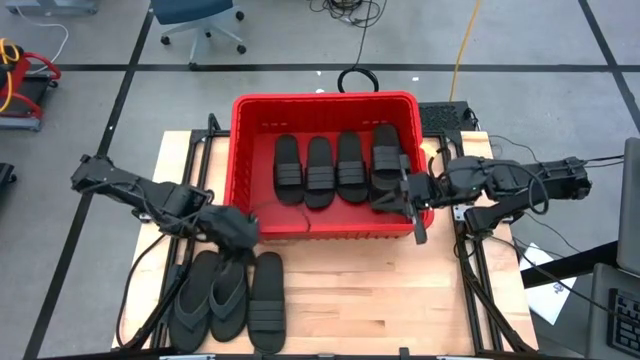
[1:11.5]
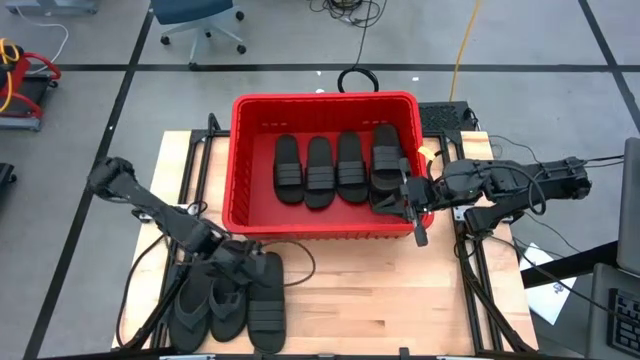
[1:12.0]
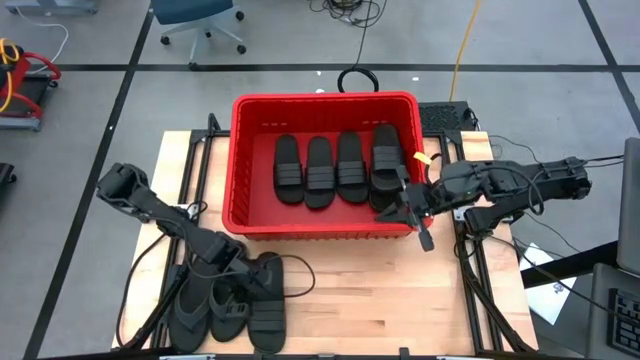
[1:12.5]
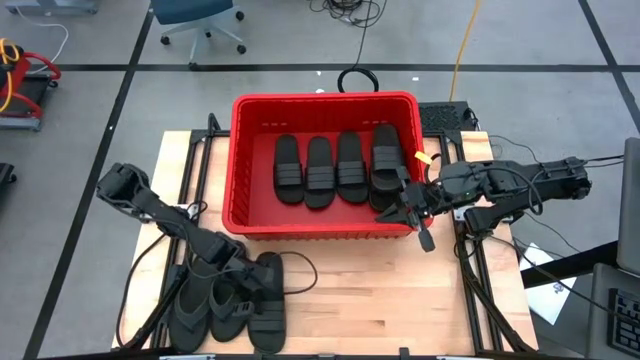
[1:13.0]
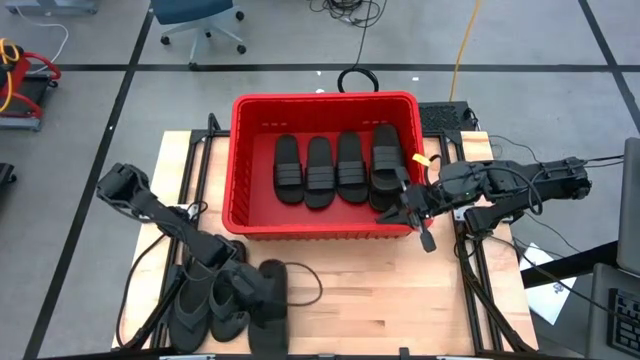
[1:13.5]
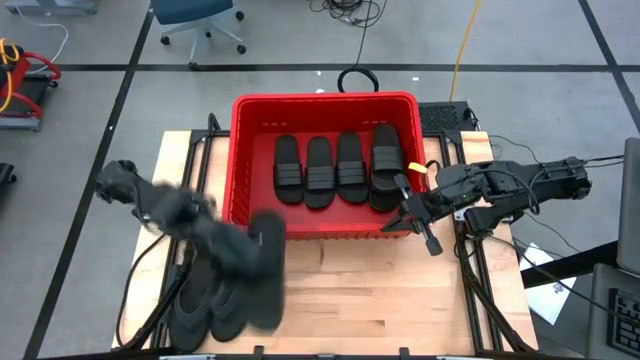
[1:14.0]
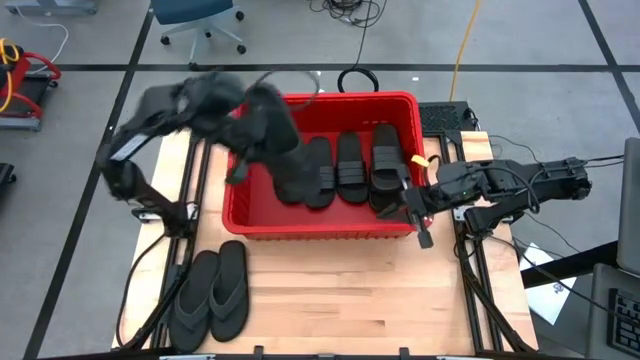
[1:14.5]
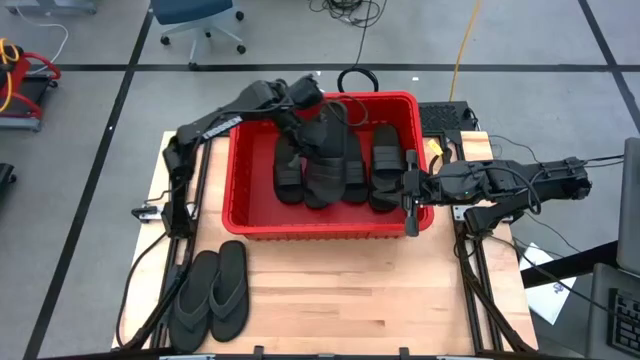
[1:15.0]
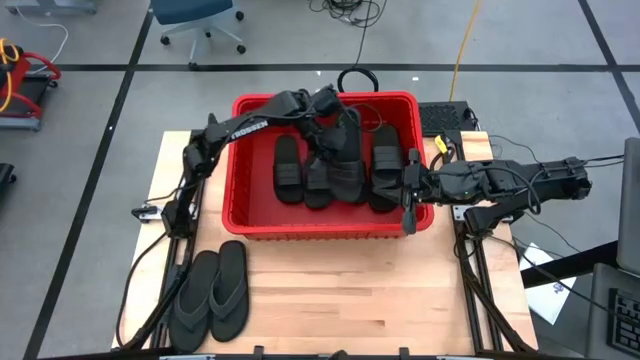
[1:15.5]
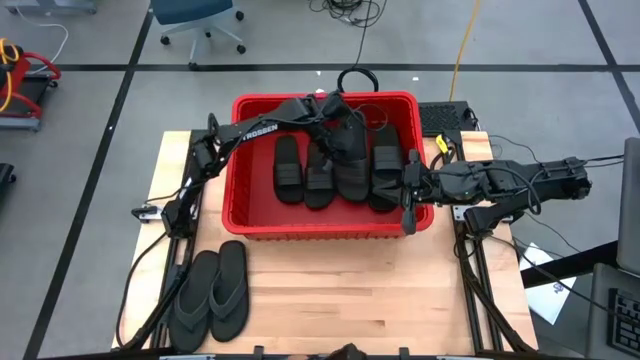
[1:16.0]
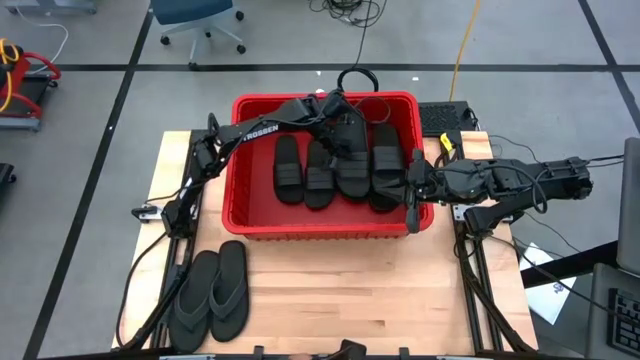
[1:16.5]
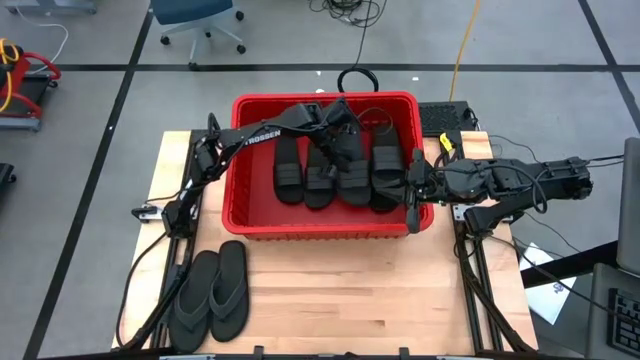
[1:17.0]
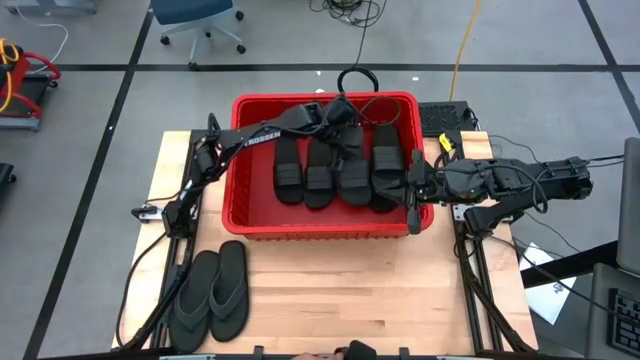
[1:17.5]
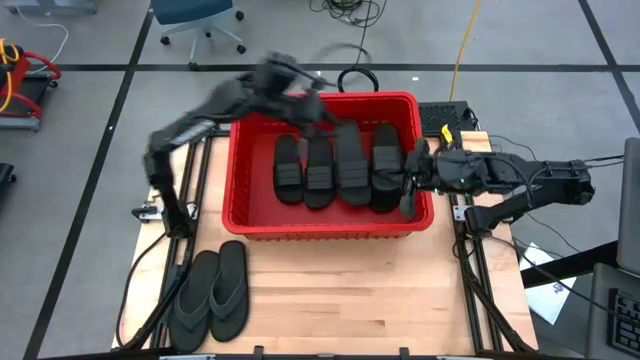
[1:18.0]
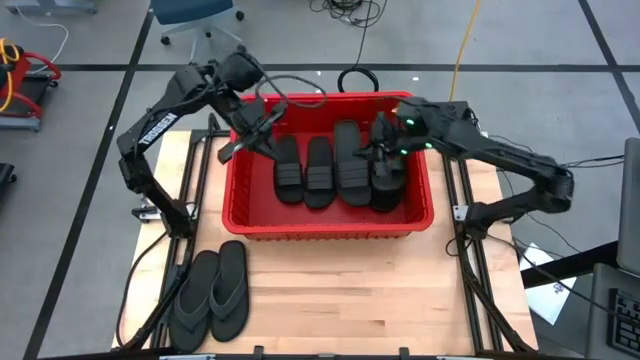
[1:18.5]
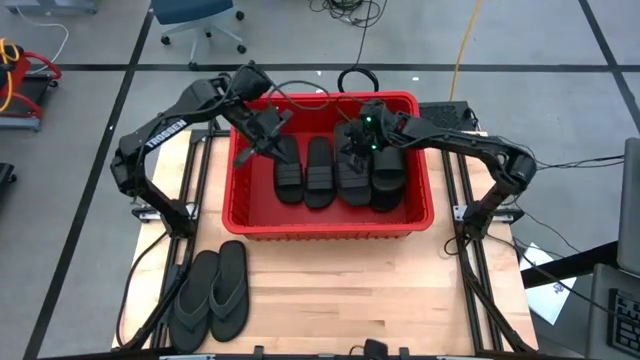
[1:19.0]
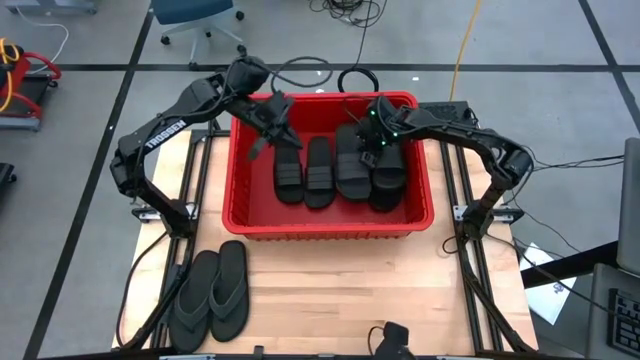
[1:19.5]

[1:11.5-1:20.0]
Task: Pick and place slides into bin
Put the black slide into the red bin

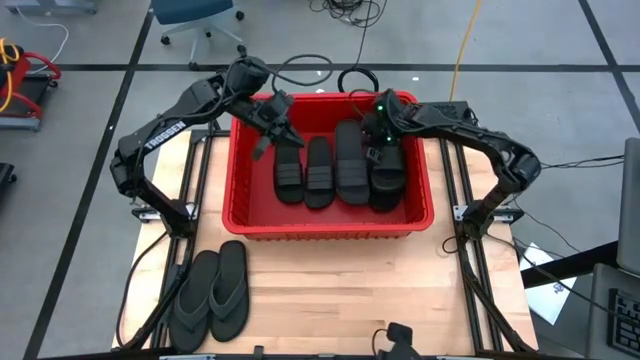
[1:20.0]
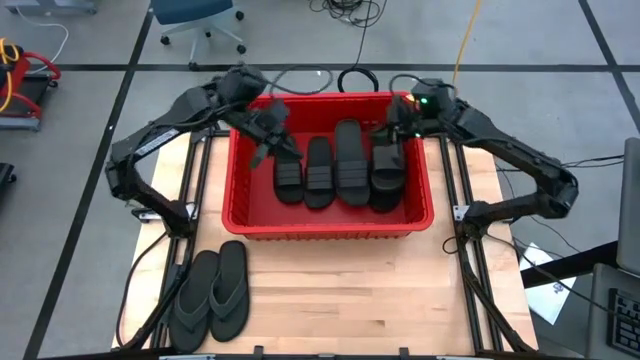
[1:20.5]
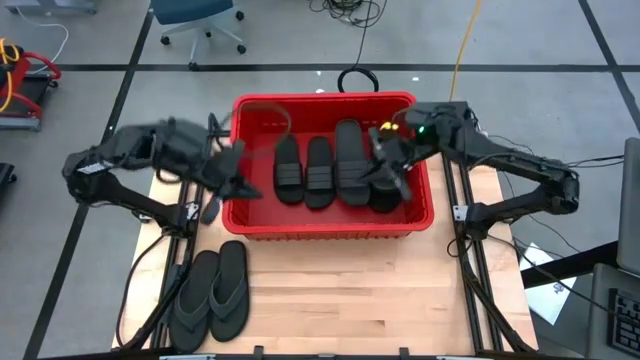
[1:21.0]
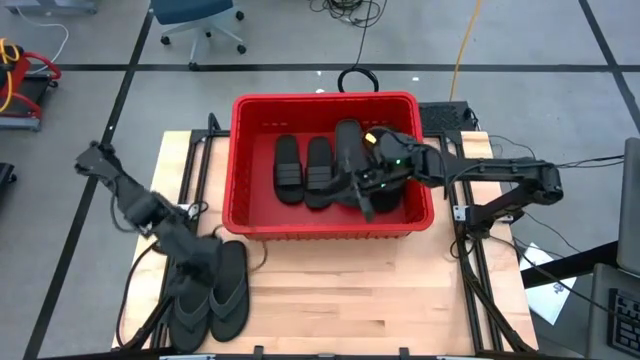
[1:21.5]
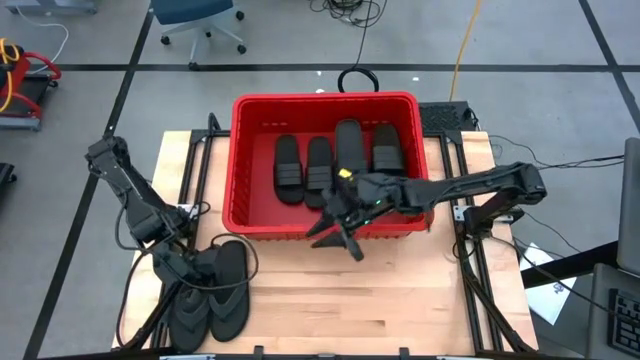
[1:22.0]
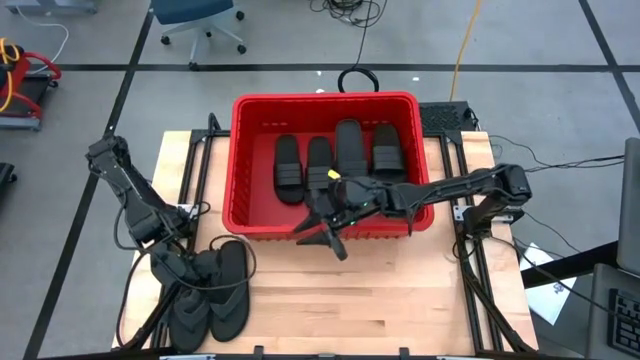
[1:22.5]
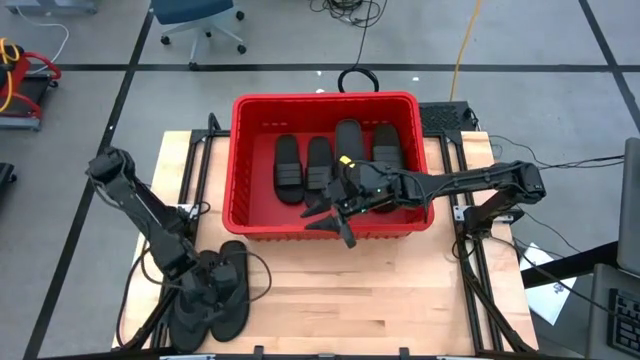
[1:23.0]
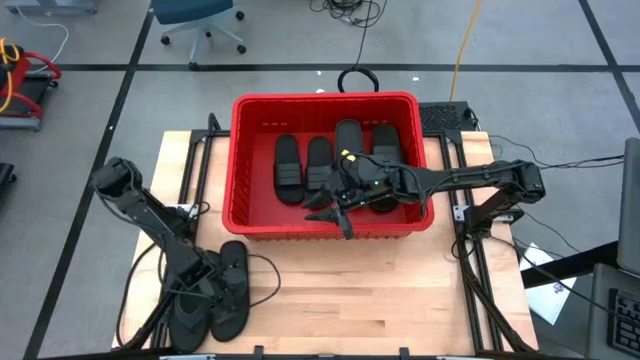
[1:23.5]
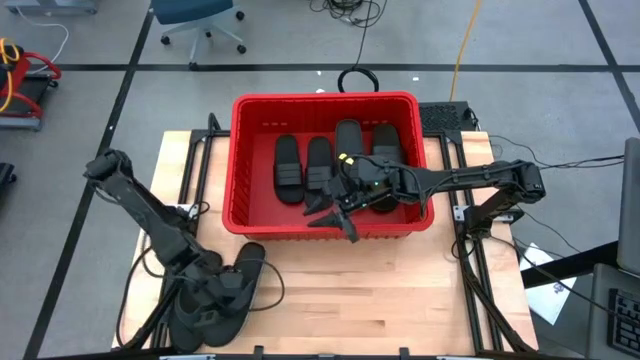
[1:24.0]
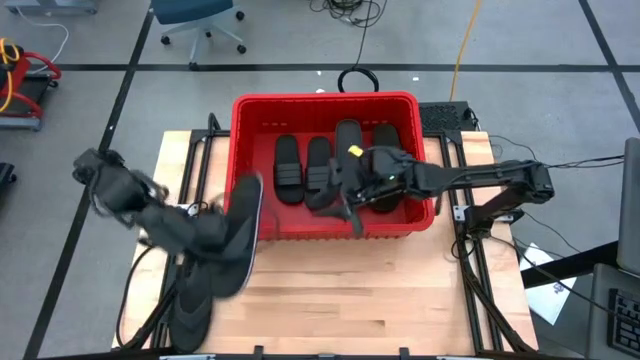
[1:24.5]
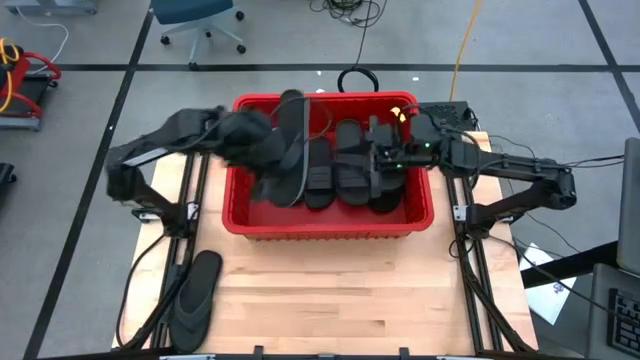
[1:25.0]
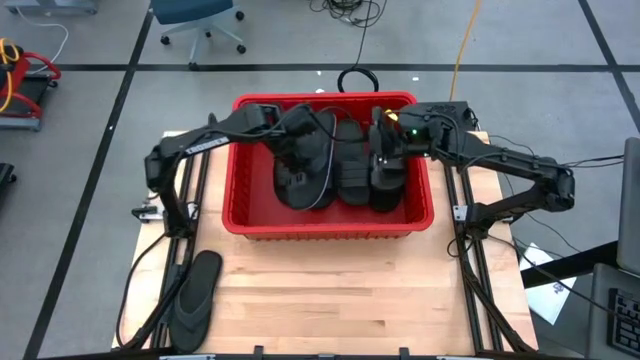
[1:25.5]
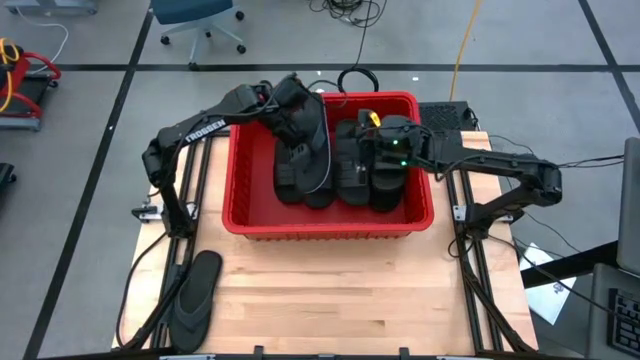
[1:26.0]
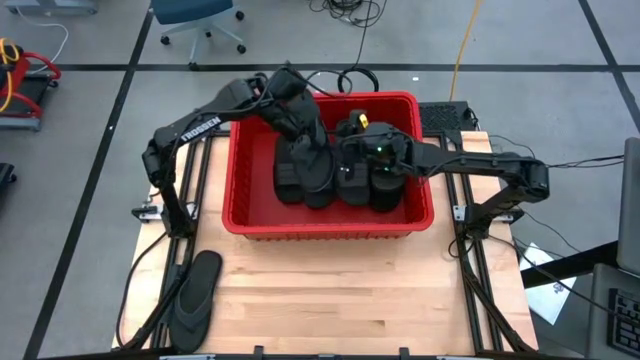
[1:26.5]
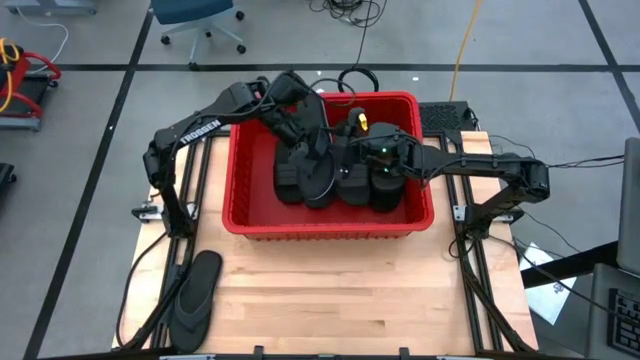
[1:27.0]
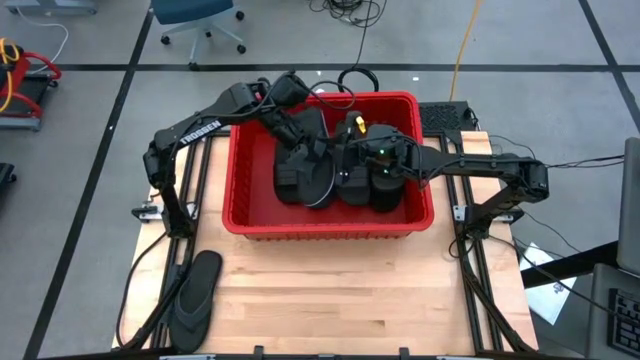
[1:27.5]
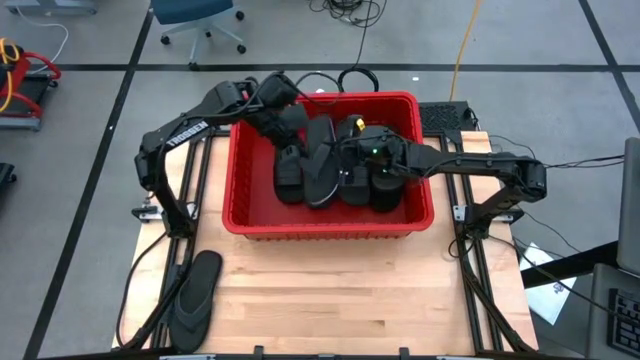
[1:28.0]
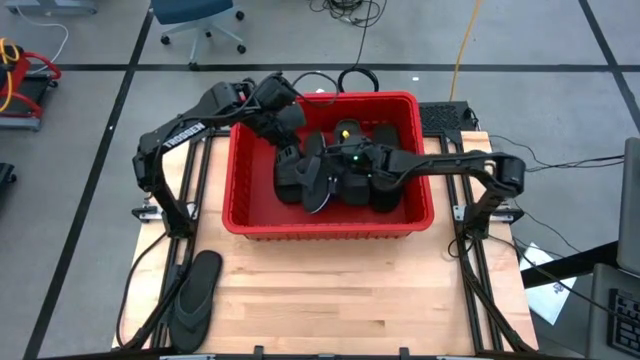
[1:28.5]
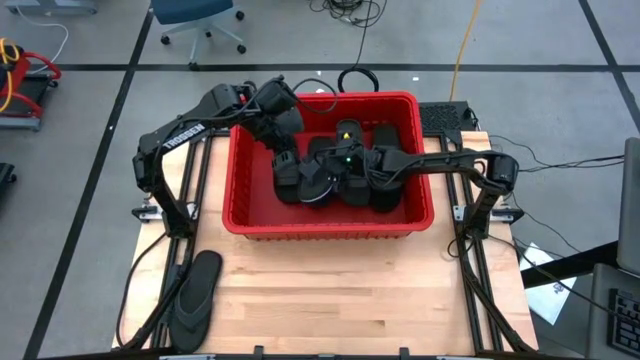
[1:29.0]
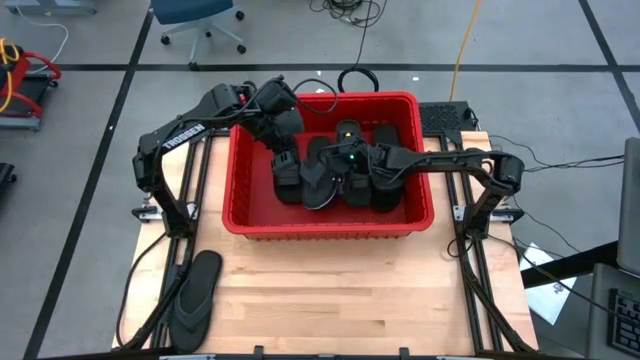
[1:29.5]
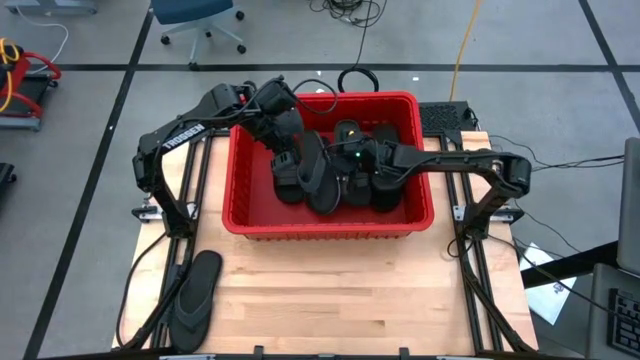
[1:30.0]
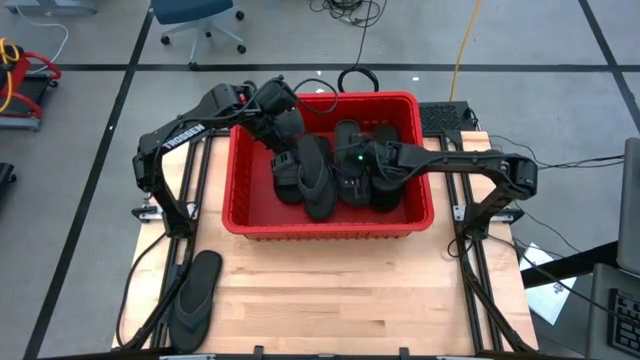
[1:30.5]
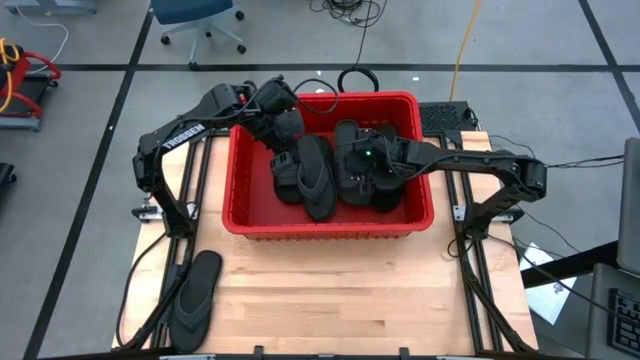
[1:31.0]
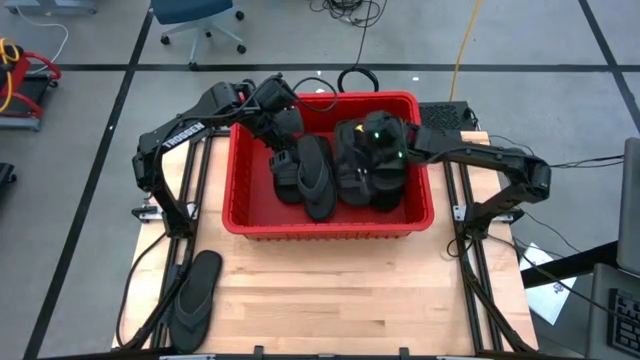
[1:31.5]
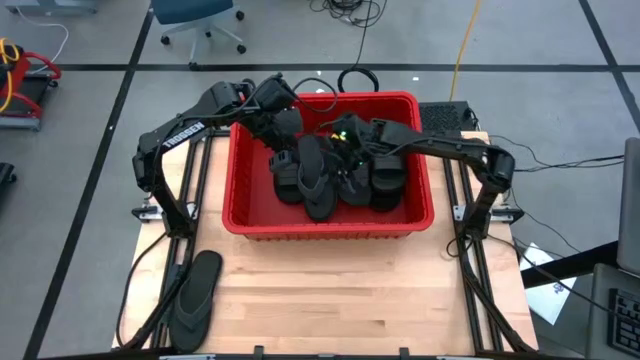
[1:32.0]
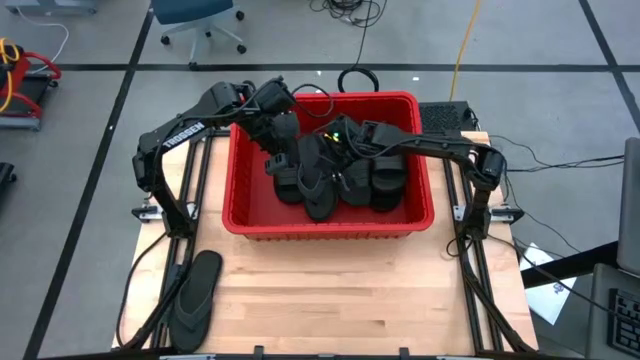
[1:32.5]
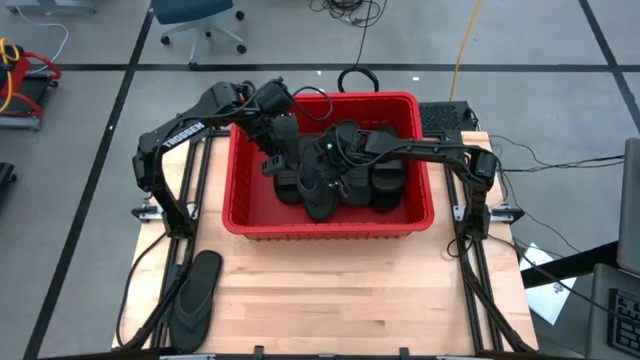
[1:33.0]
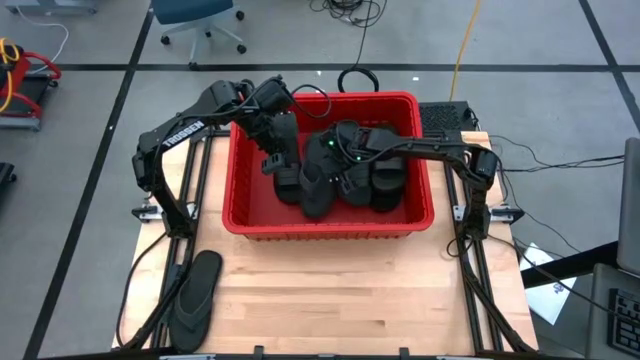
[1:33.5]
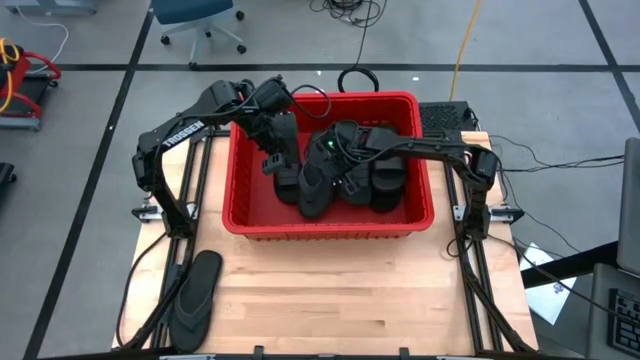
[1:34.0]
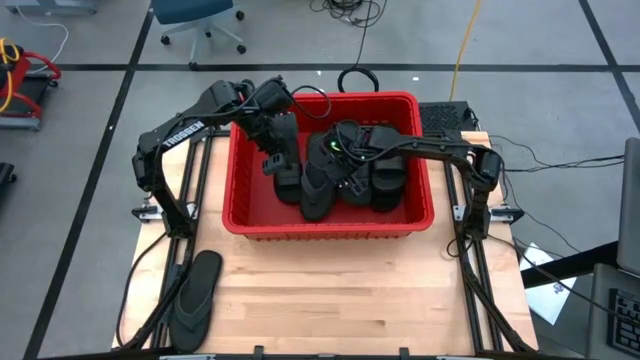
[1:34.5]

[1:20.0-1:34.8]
Put the black slipper into the red bin
